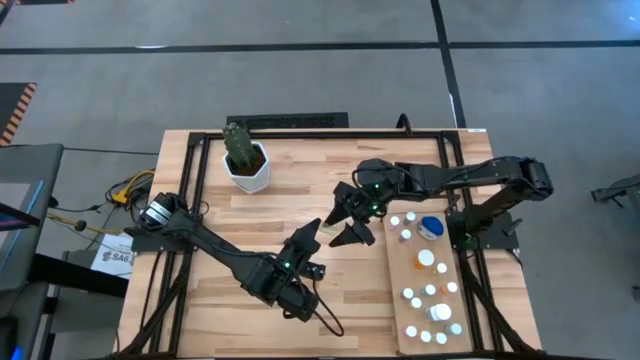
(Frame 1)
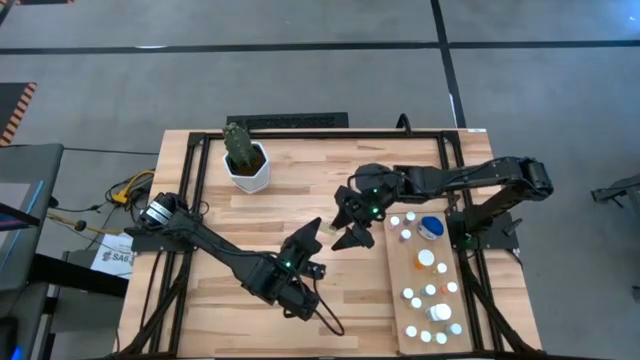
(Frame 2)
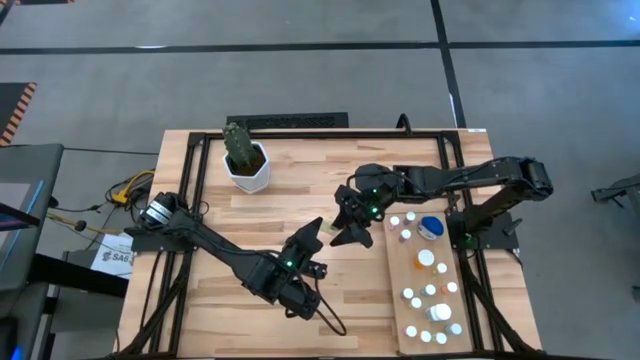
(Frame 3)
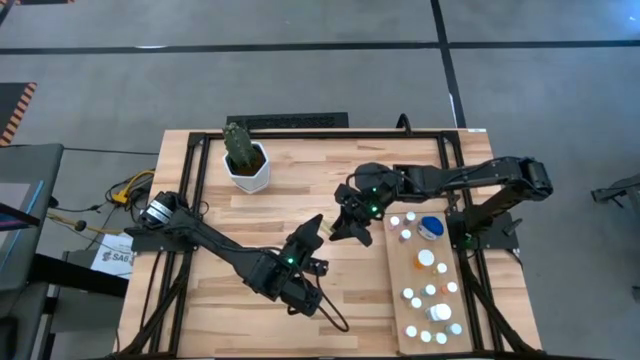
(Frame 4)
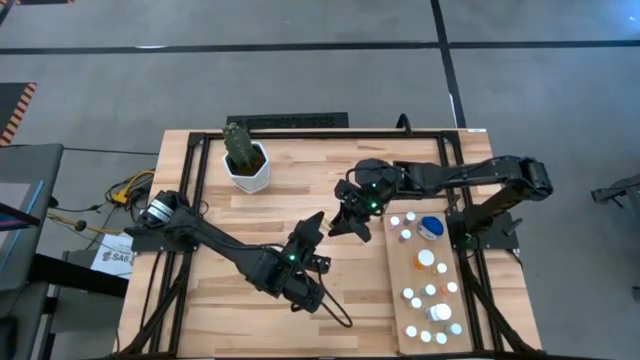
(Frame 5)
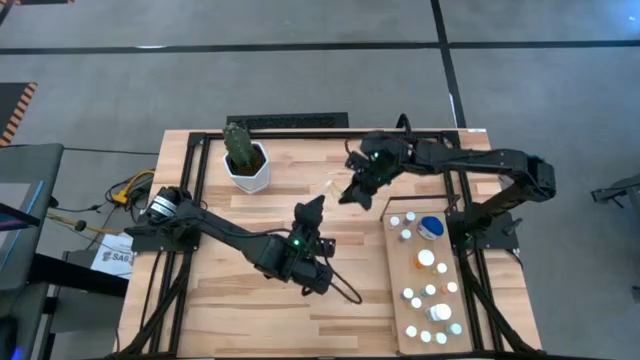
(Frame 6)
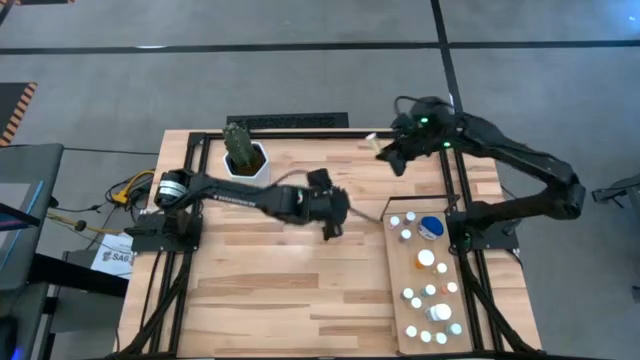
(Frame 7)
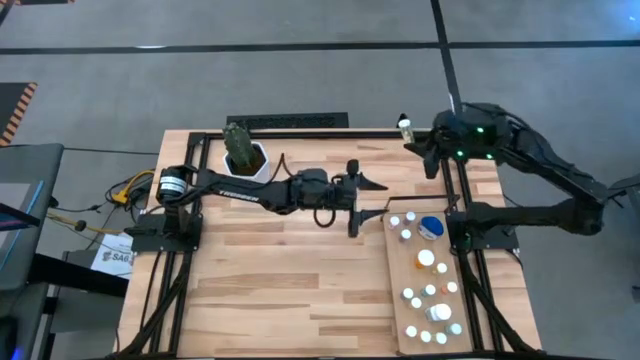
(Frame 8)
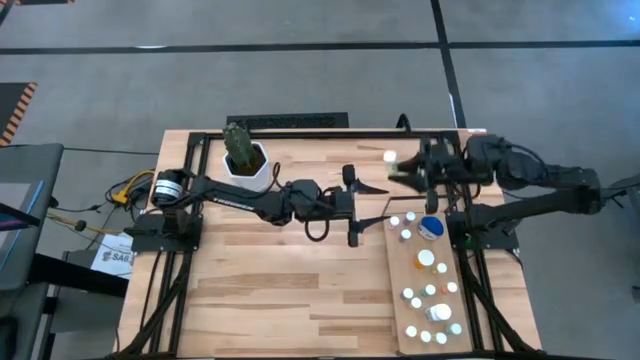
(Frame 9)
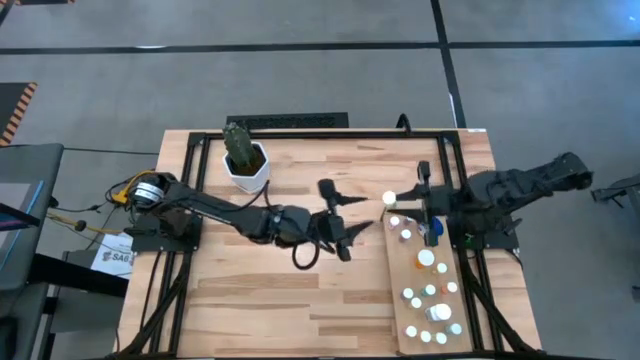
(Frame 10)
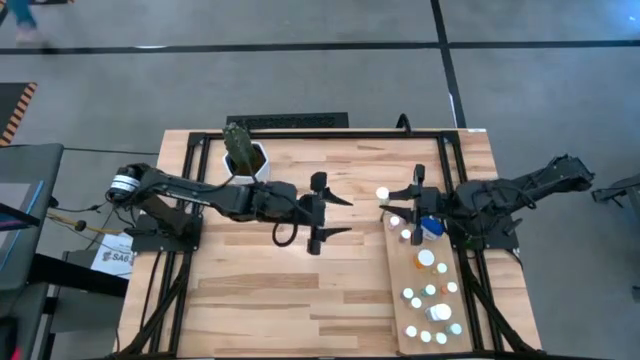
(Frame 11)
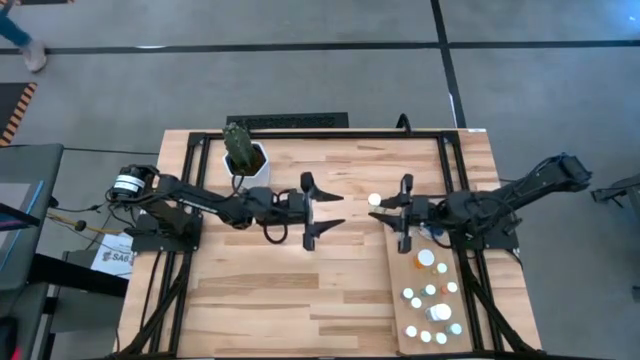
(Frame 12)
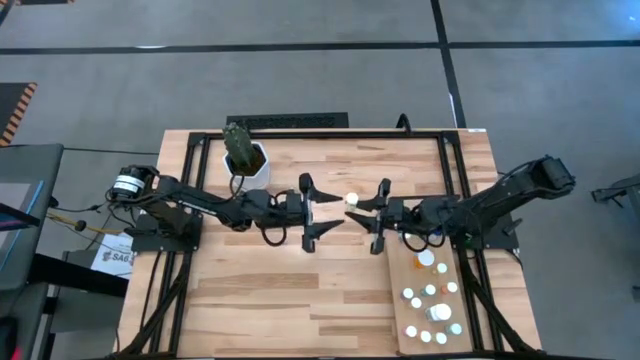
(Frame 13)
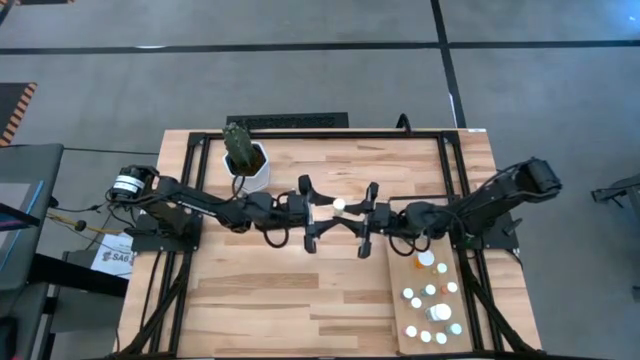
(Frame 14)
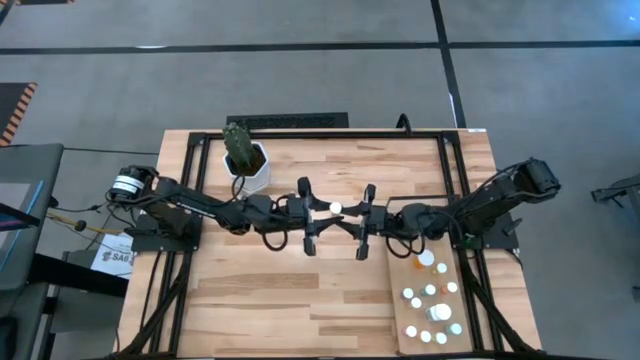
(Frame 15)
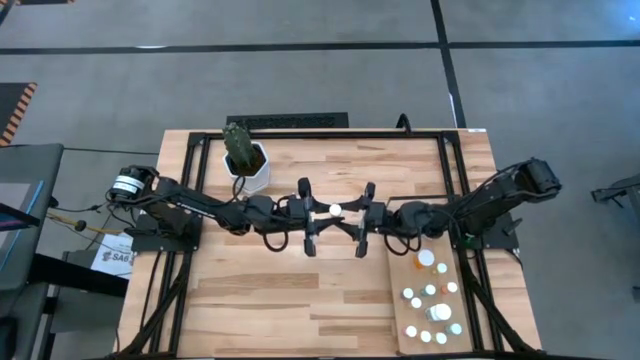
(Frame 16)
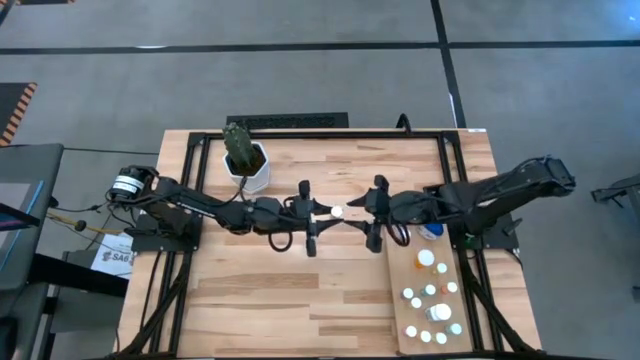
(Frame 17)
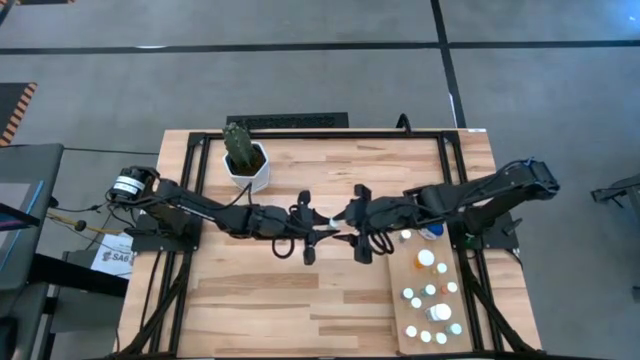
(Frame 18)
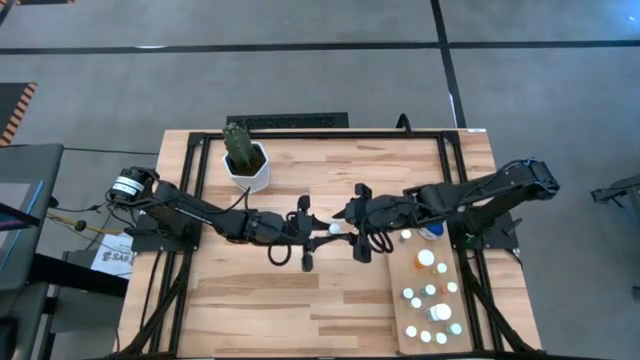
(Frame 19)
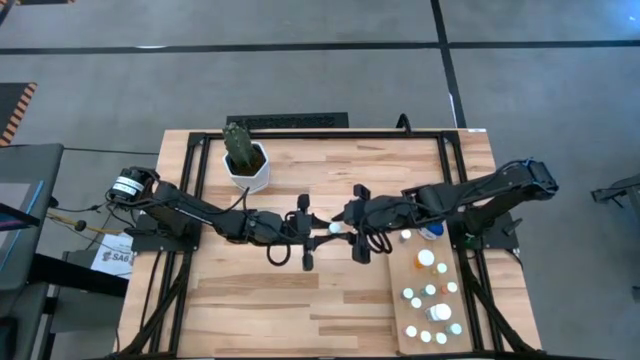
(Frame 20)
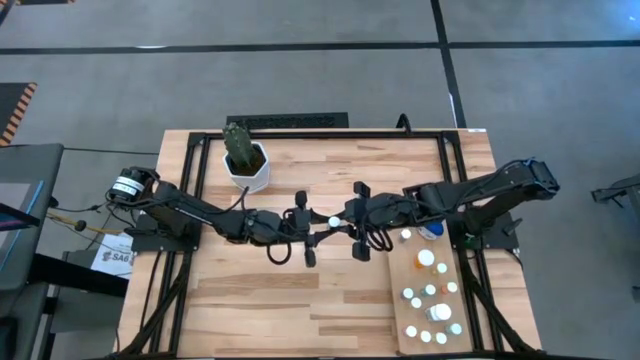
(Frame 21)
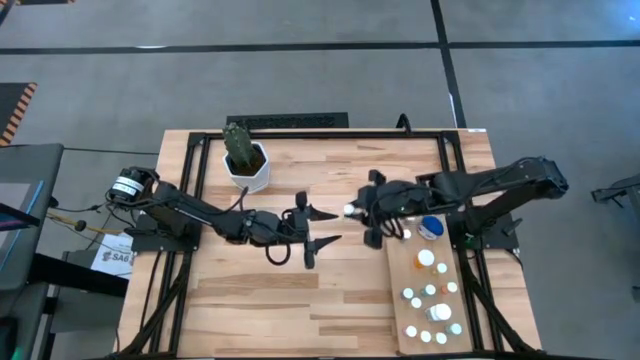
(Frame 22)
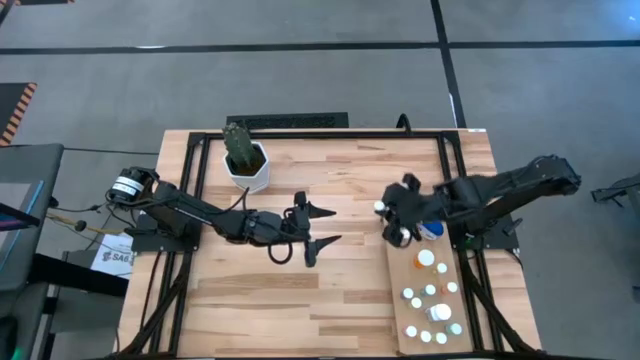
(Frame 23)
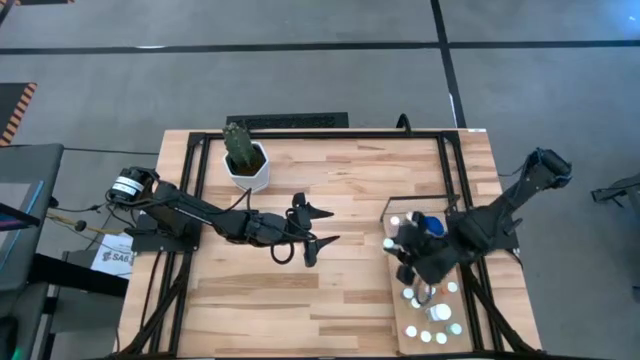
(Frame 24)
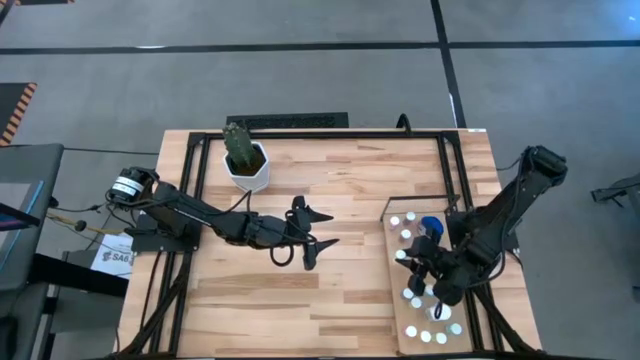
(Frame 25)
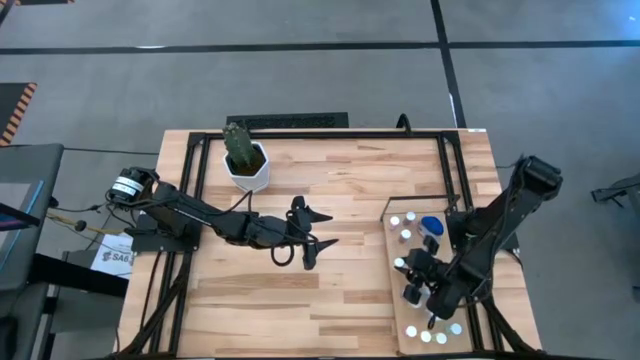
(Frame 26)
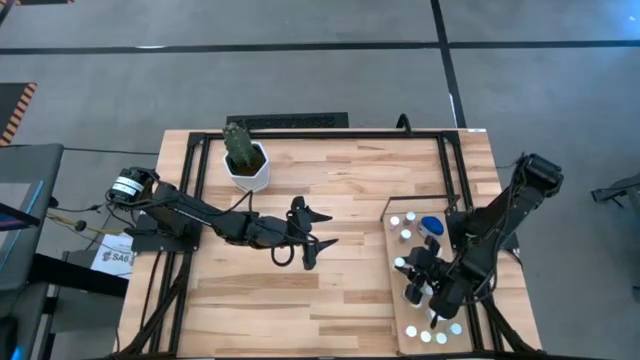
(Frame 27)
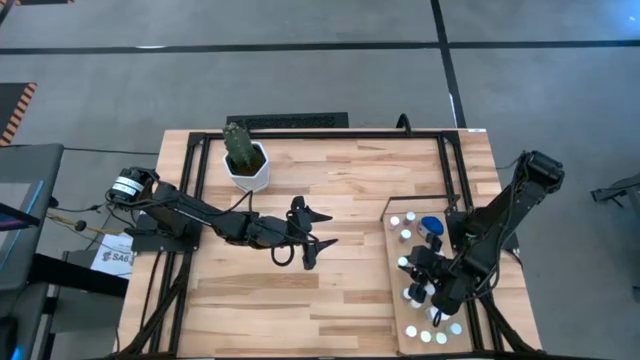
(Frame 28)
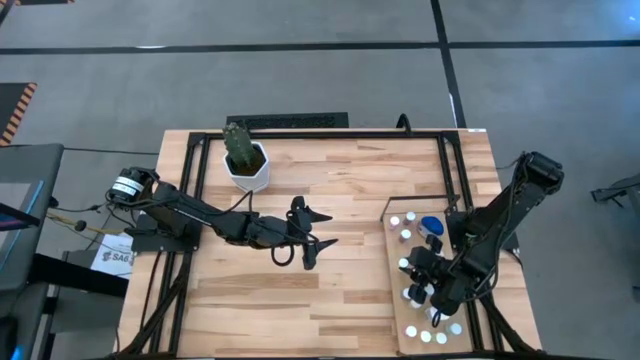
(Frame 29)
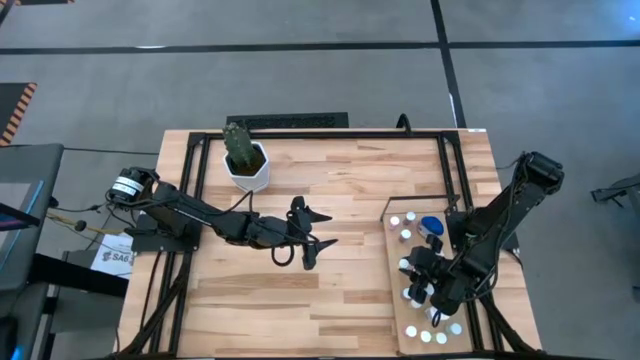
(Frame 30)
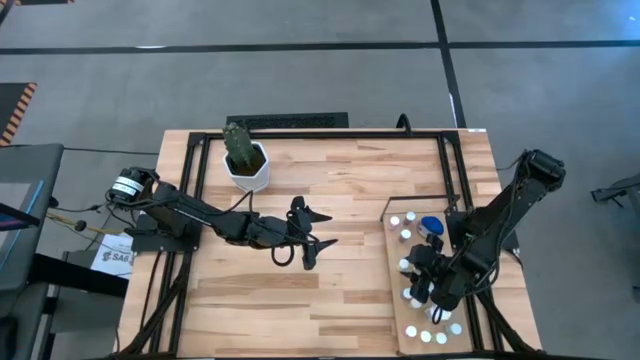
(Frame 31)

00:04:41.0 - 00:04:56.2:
Task: Pick and place medicine bottles onto shelf by color
Put the yellow pill bottle on the shelf
